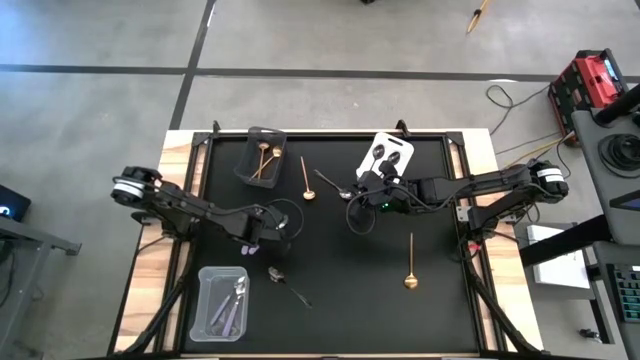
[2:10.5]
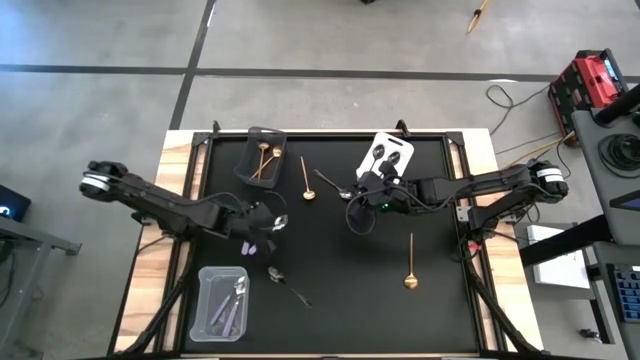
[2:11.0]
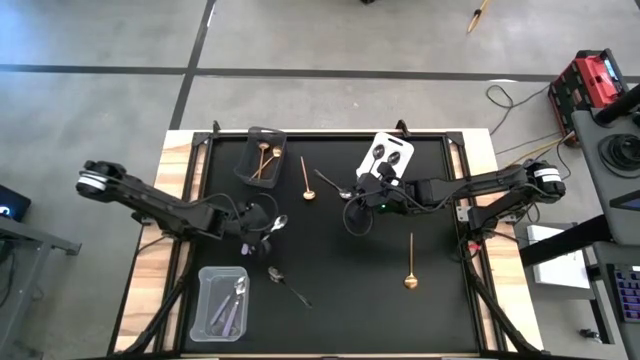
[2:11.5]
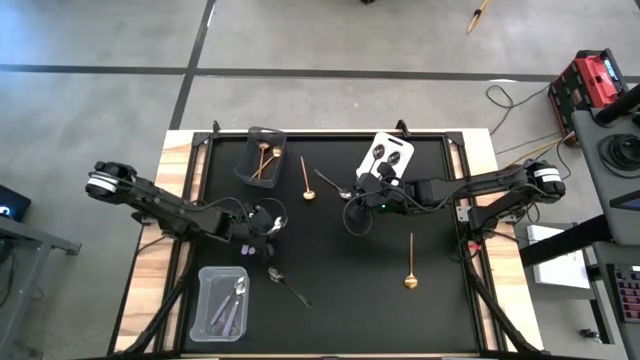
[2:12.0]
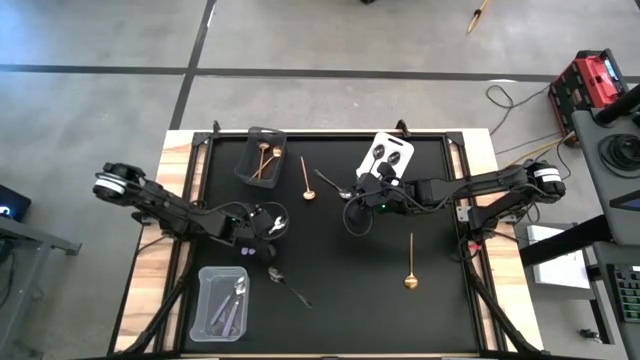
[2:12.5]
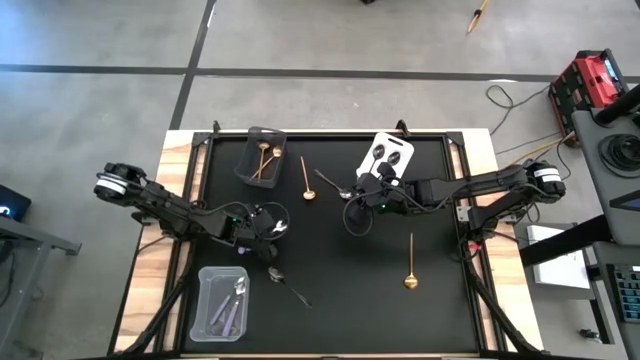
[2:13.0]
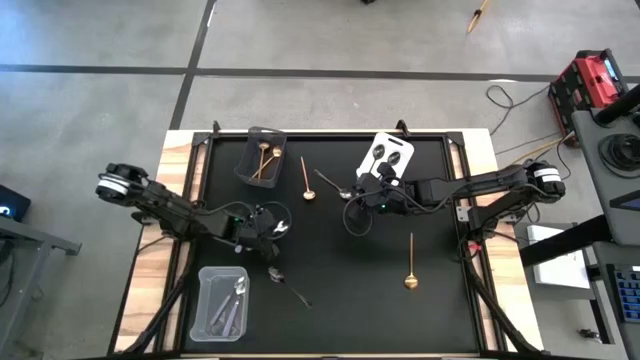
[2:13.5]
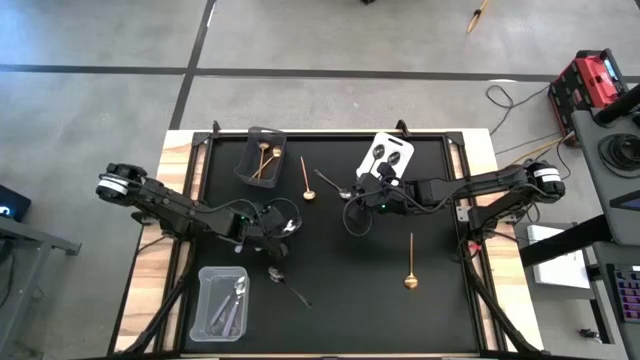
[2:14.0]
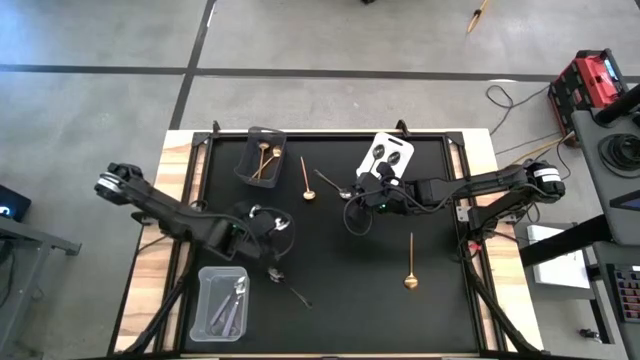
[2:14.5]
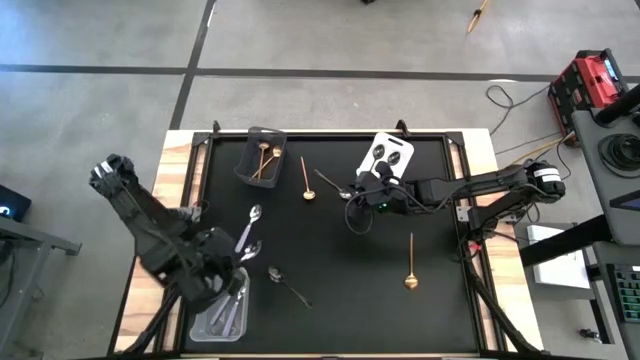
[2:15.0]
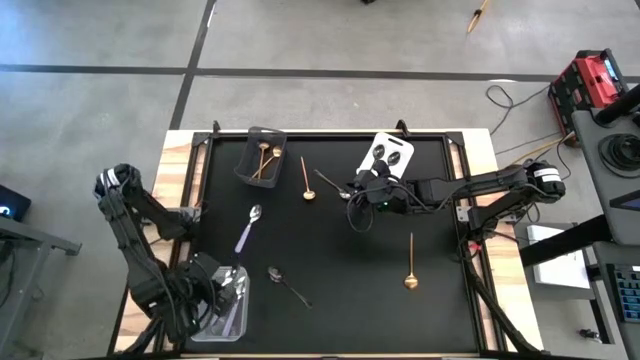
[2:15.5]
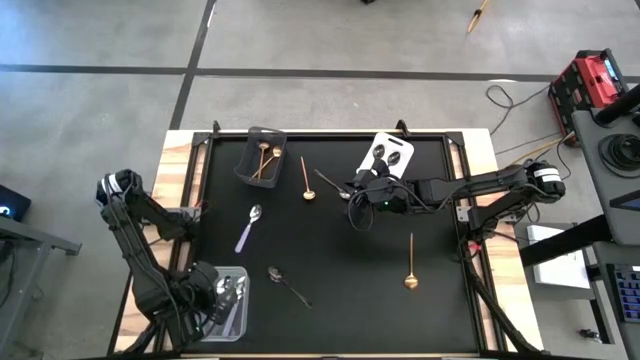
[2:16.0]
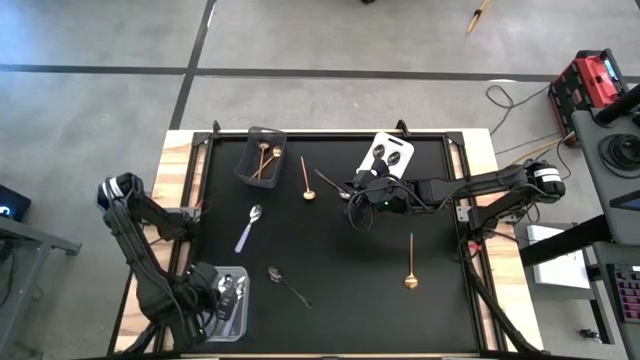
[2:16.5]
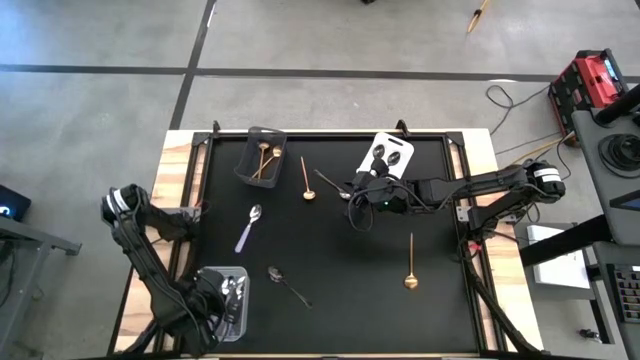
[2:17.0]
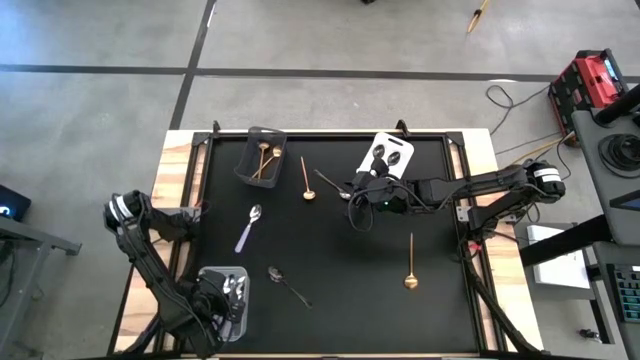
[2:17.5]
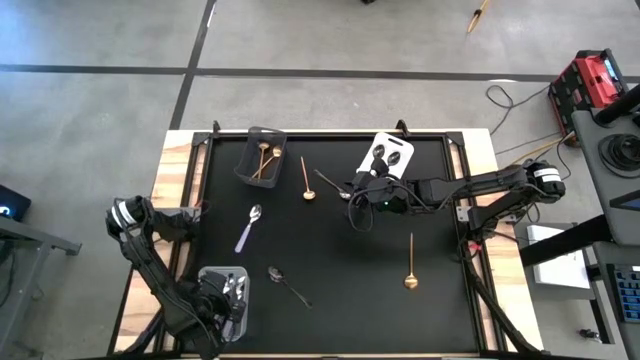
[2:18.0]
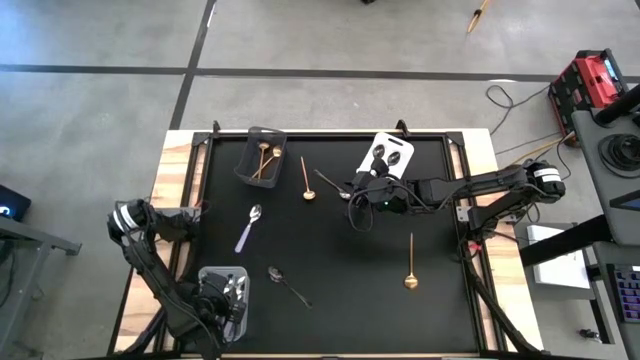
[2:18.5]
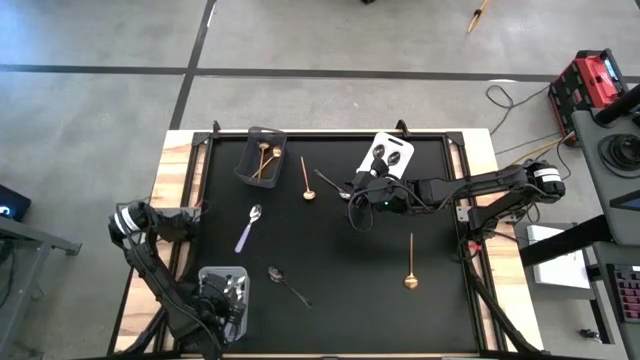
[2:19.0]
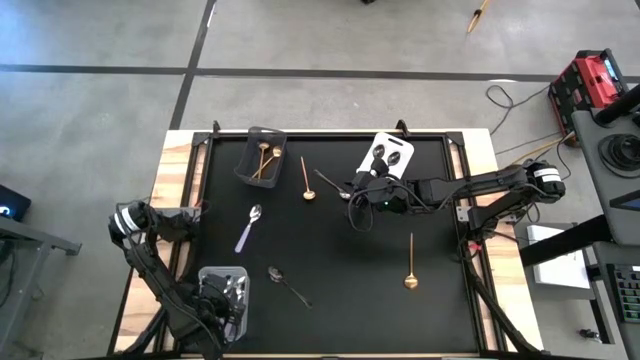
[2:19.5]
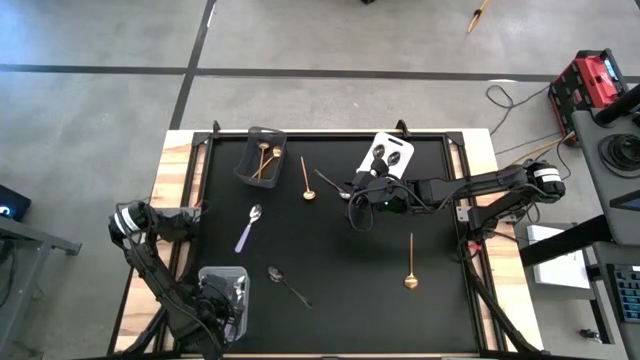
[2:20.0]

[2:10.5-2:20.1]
Task: Sort silverware by color (type)
Put the purple spoon into the transparent bin

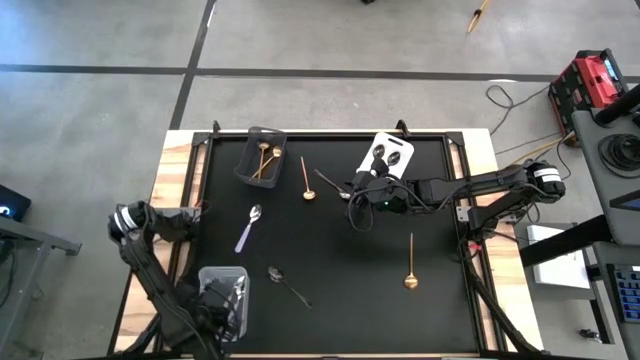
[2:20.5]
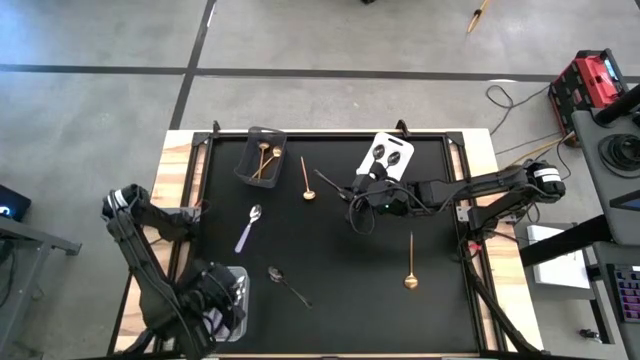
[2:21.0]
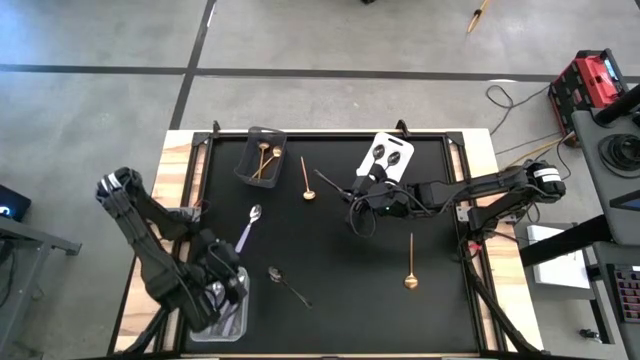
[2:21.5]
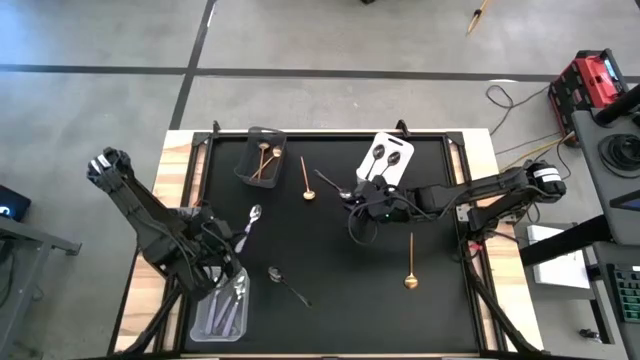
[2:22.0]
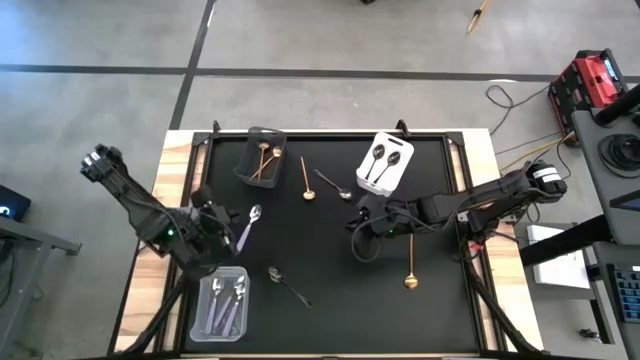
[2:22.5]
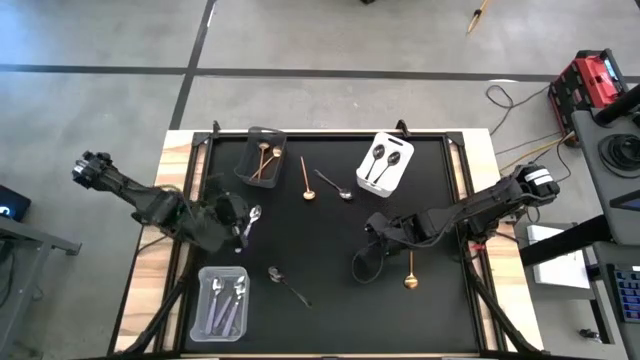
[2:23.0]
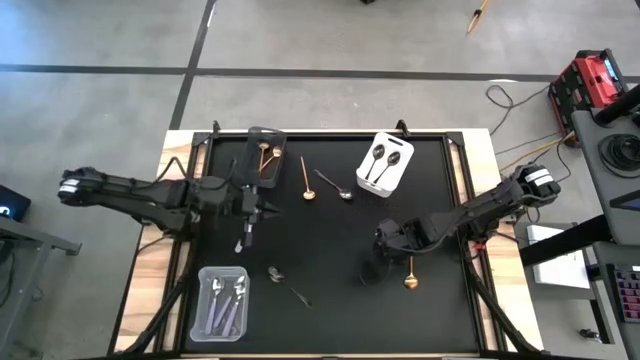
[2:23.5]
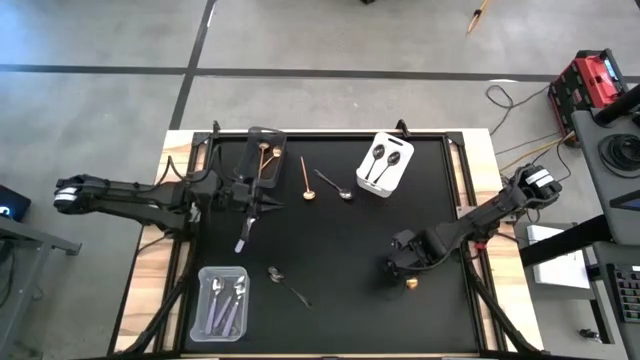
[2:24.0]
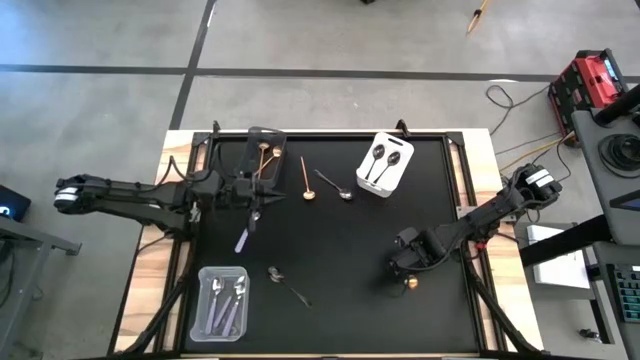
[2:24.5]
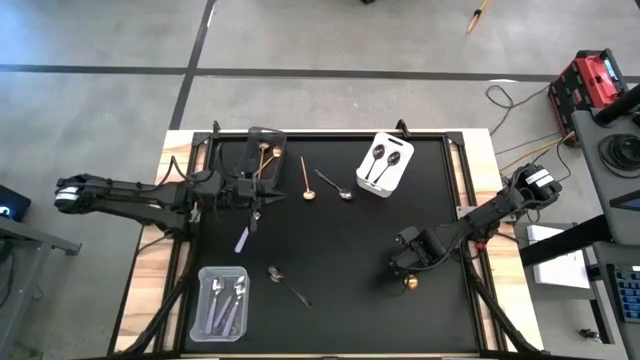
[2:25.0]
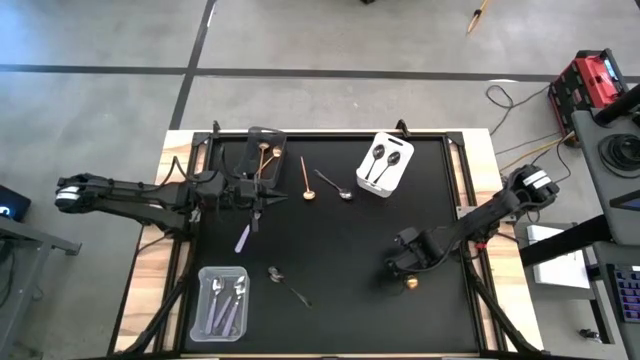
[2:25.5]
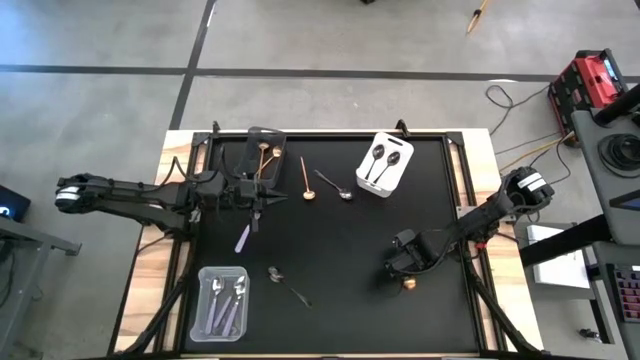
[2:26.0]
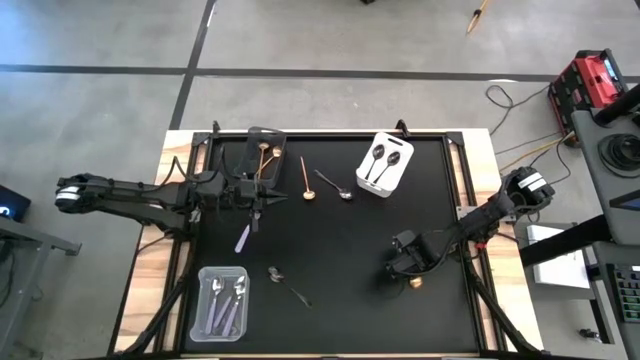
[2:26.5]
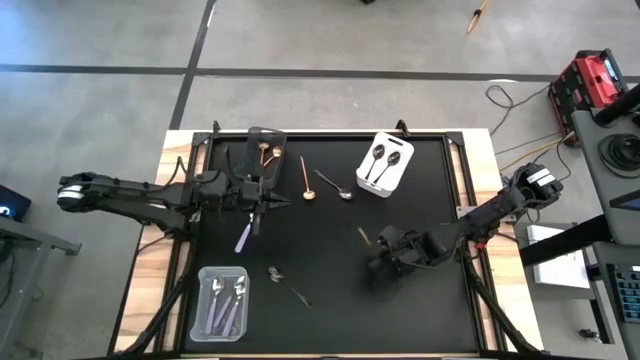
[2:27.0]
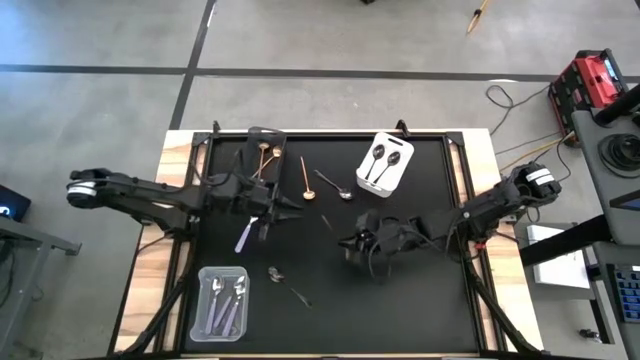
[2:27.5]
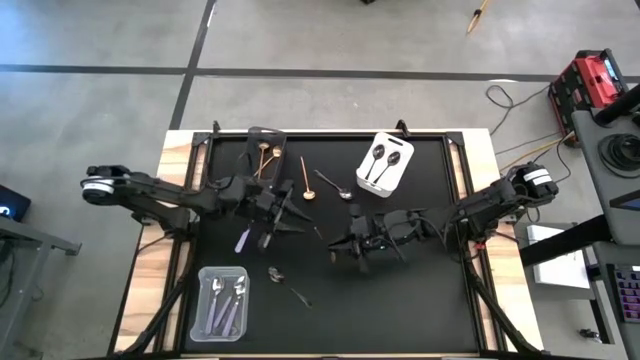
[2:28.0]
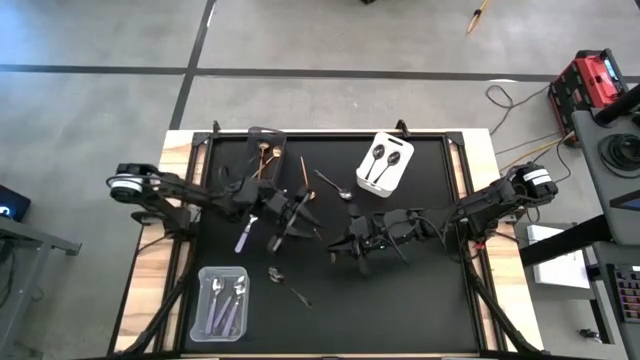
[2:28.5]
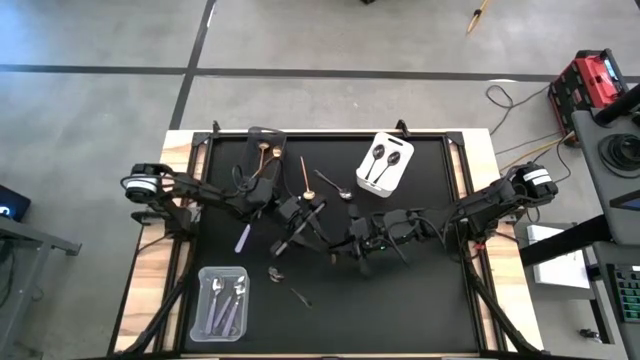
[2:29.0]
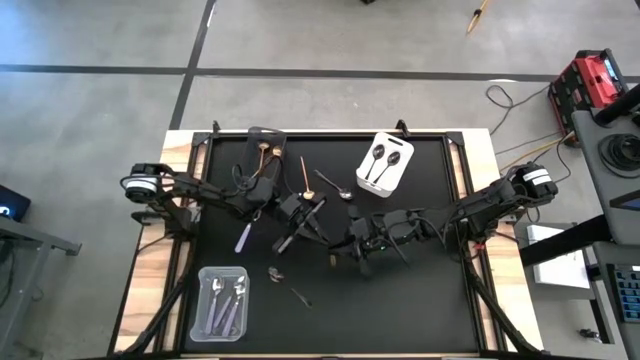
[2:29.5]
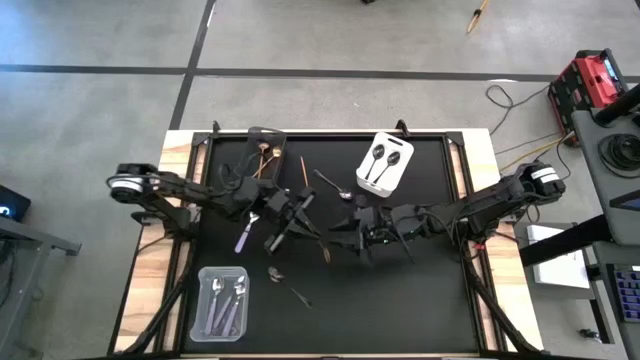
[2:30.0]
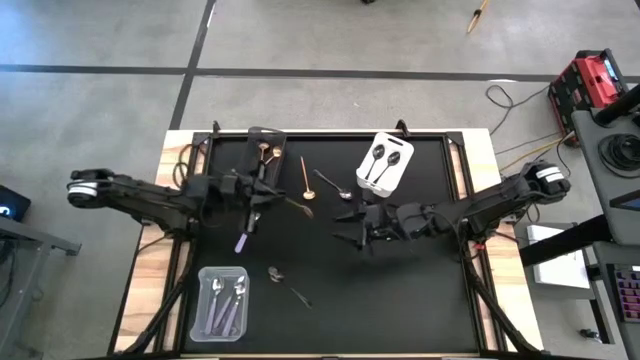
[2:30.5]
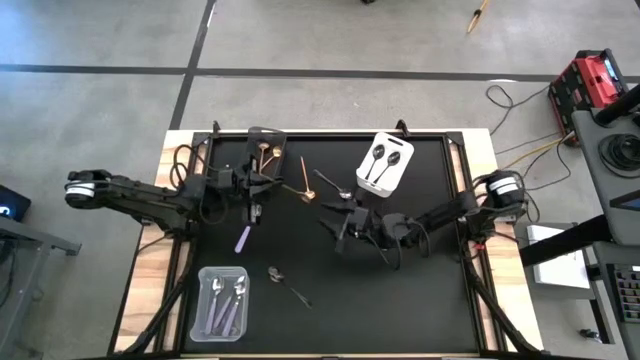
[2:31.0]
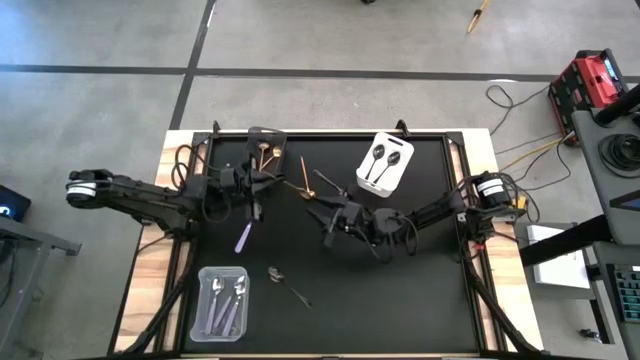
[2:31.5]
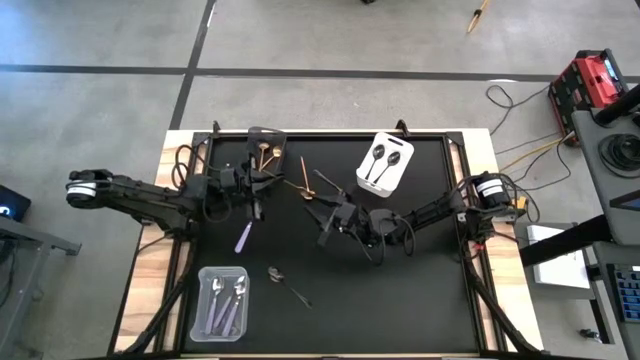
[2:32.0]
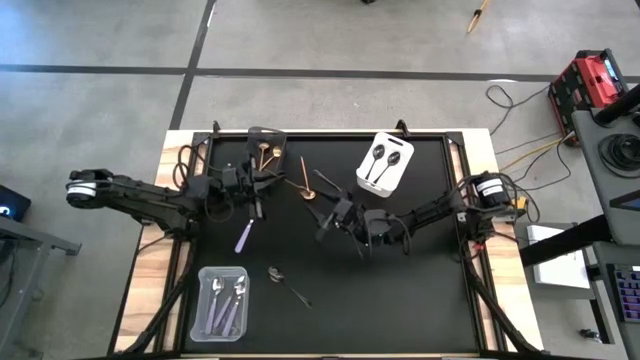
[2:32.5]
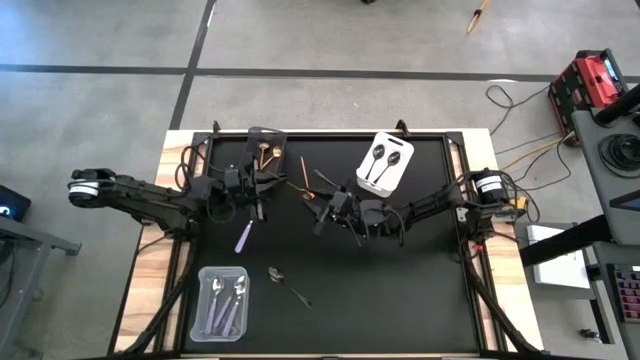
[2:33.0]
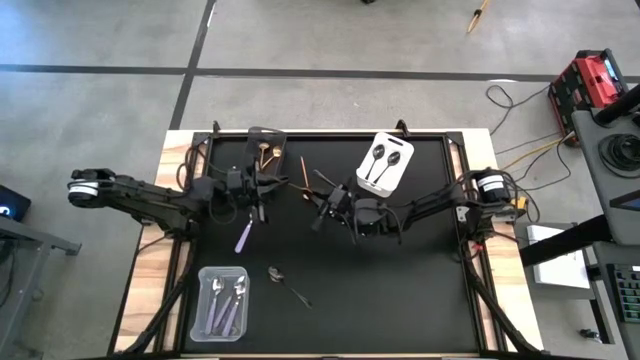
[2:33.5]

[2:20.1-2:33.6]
Put the gold spoon into the black bin
